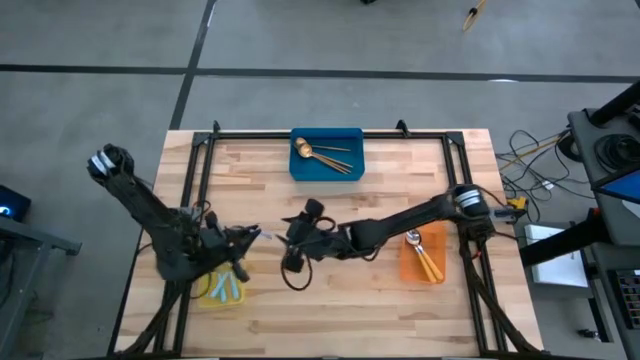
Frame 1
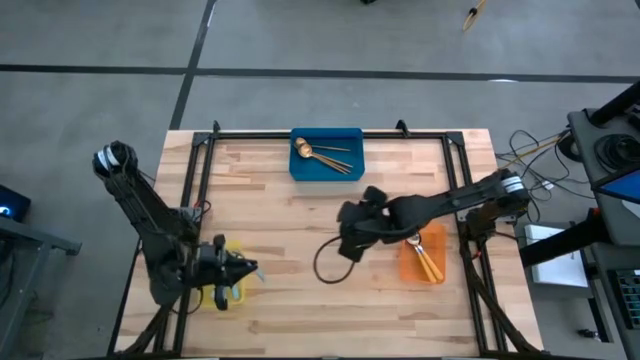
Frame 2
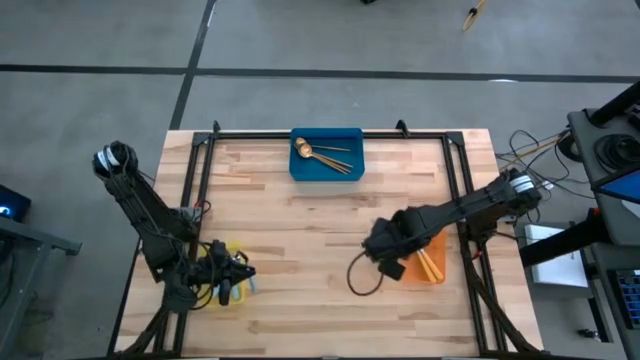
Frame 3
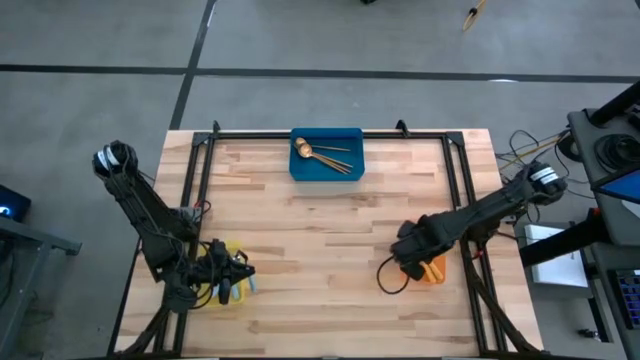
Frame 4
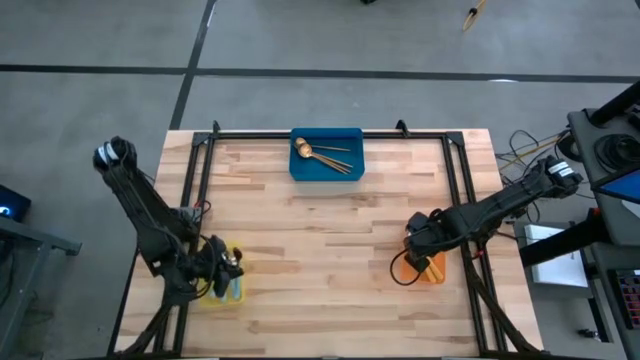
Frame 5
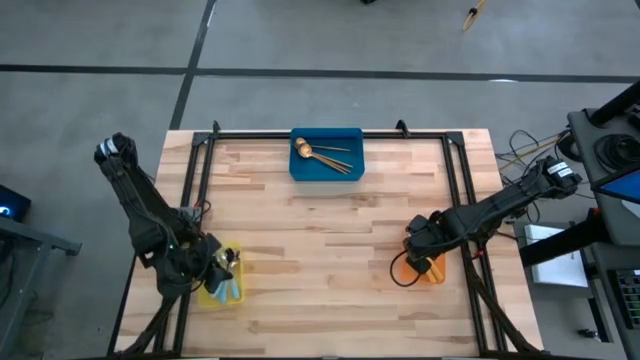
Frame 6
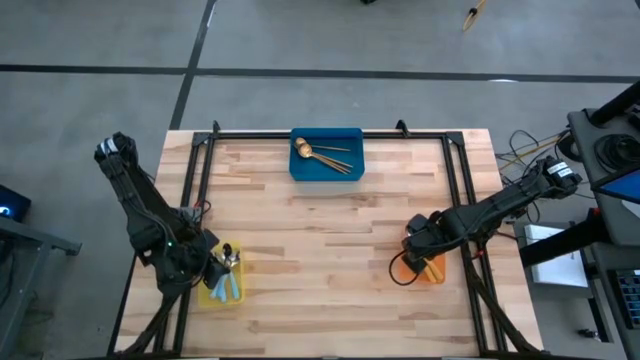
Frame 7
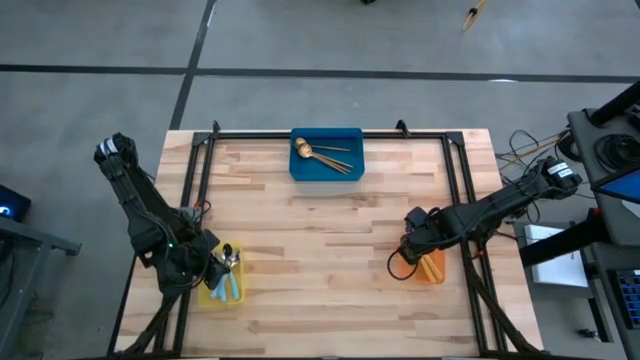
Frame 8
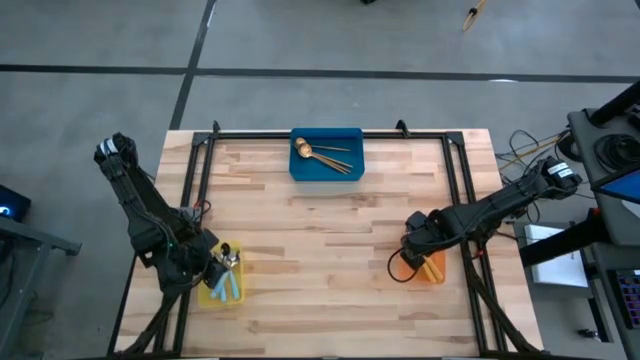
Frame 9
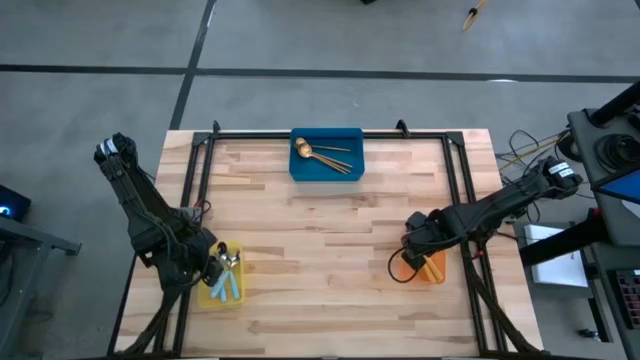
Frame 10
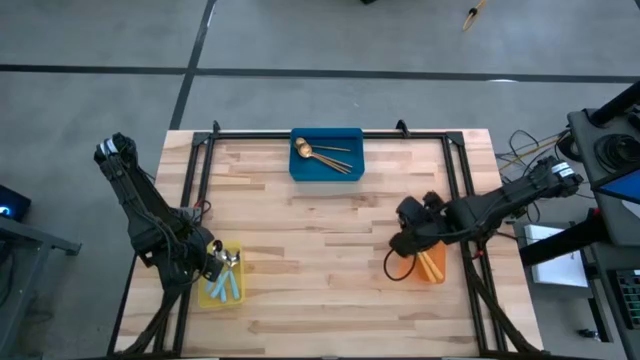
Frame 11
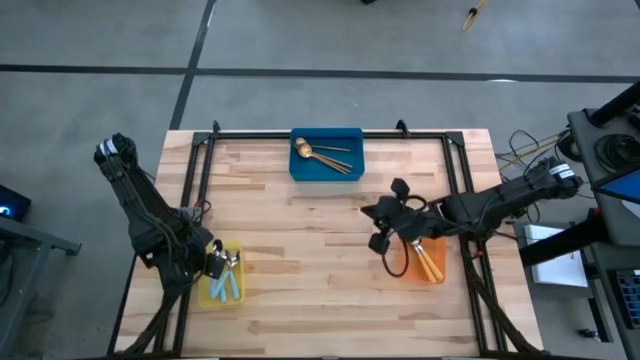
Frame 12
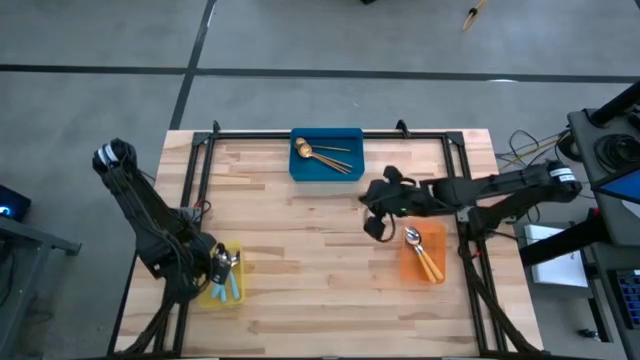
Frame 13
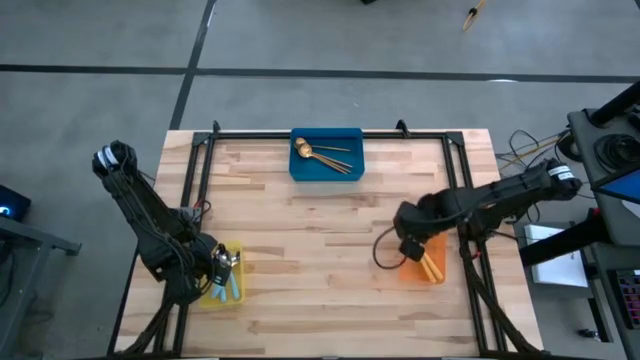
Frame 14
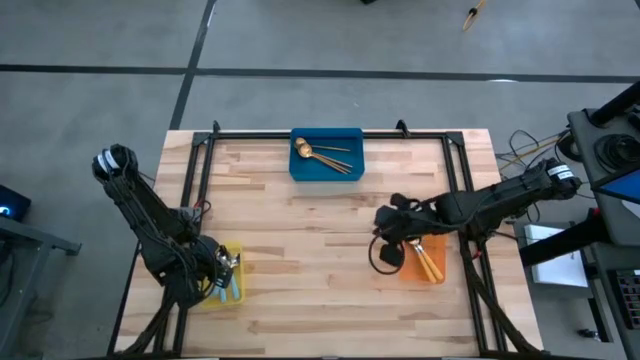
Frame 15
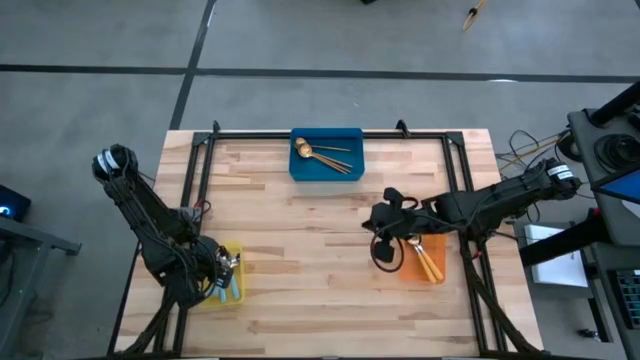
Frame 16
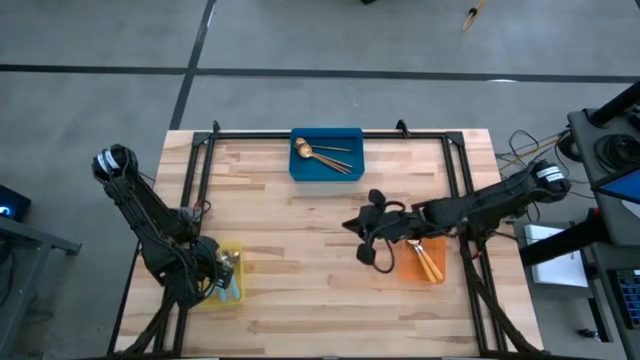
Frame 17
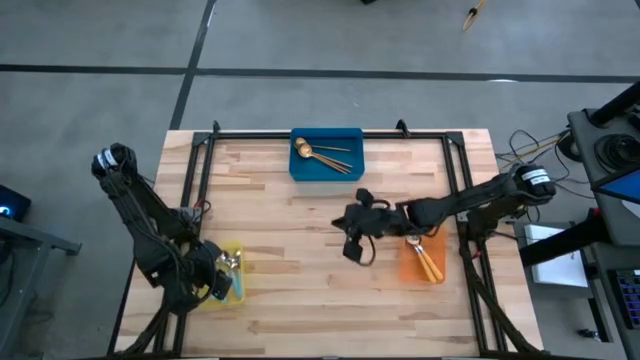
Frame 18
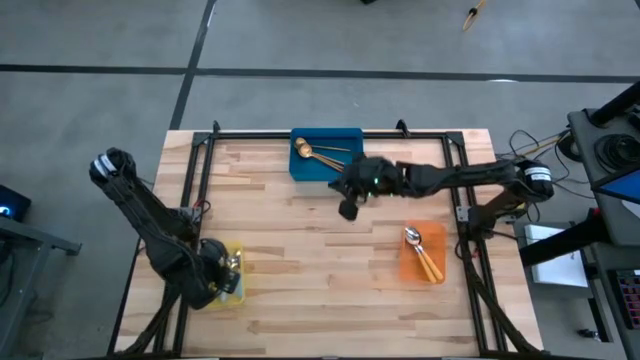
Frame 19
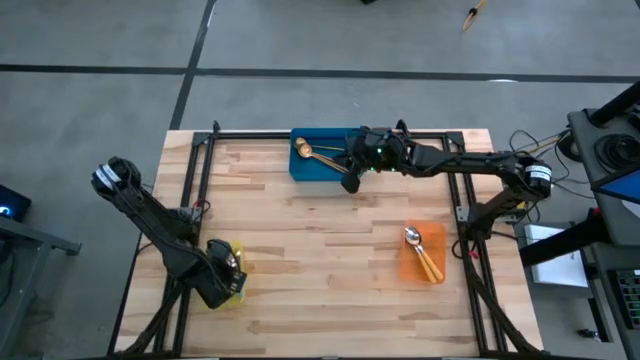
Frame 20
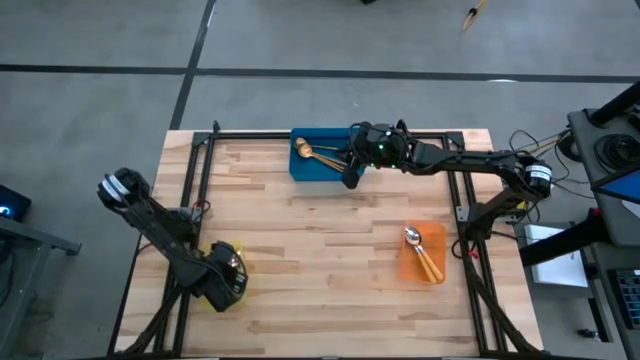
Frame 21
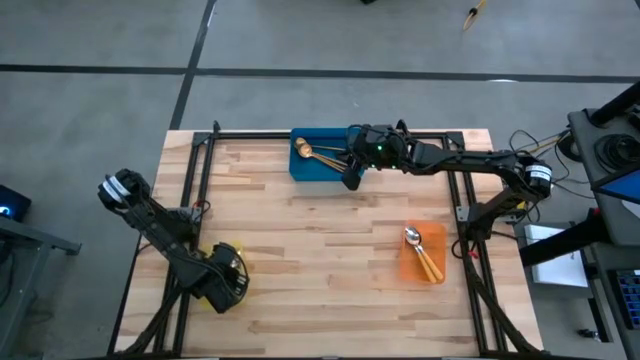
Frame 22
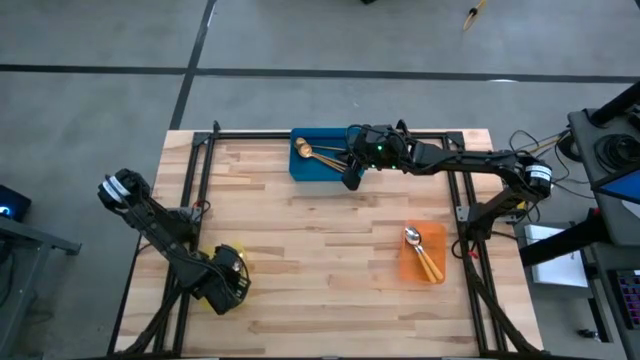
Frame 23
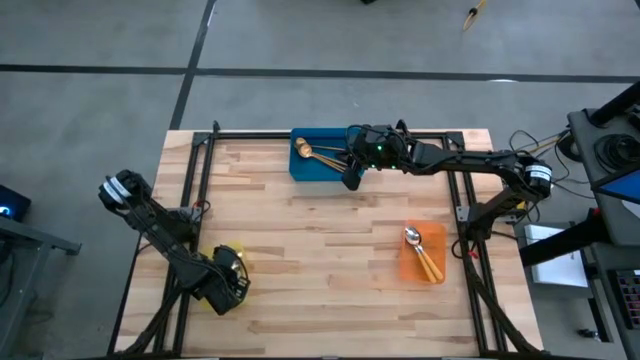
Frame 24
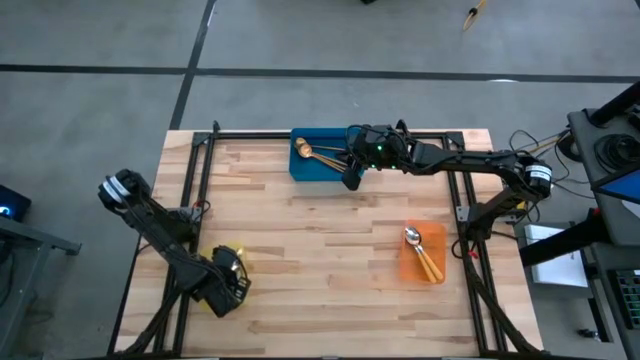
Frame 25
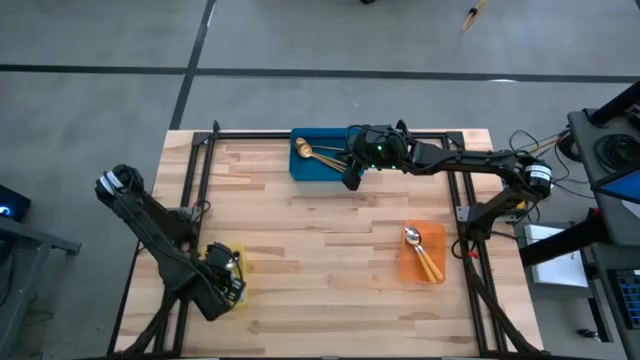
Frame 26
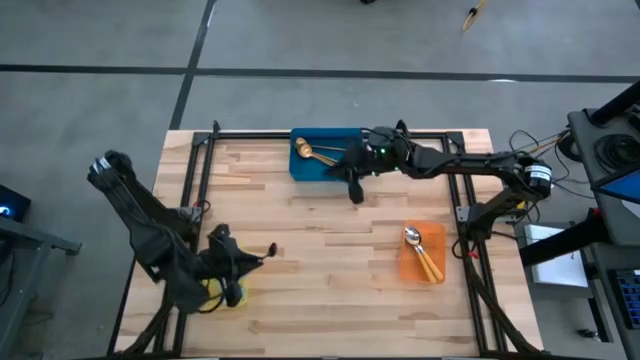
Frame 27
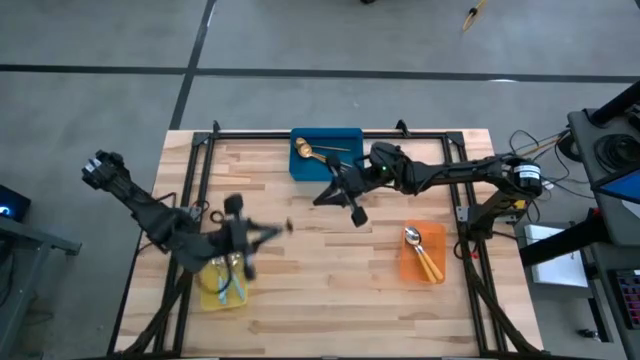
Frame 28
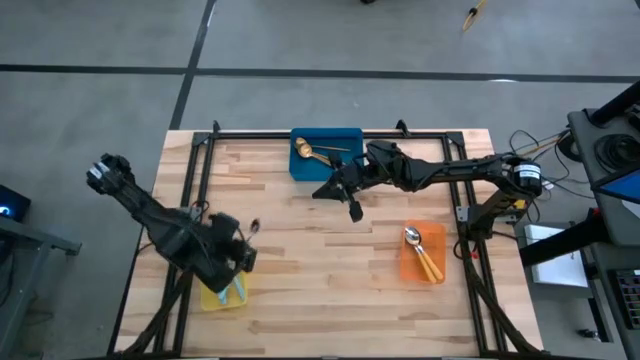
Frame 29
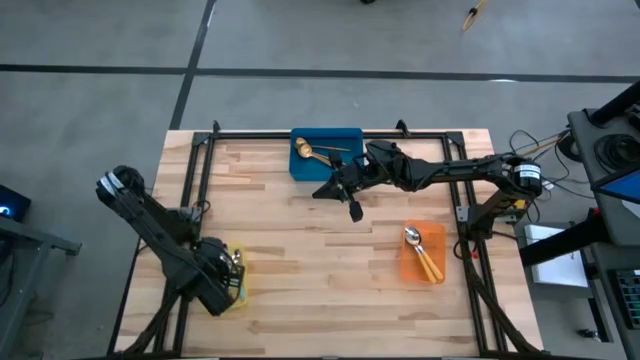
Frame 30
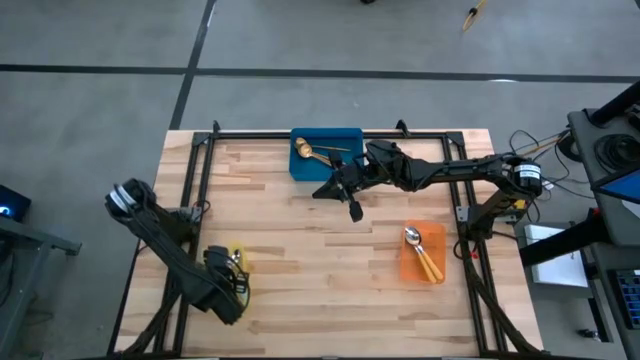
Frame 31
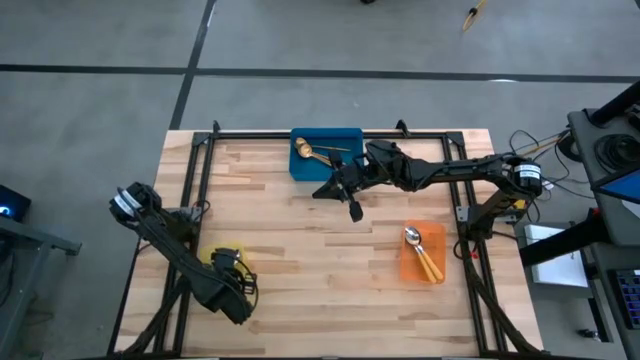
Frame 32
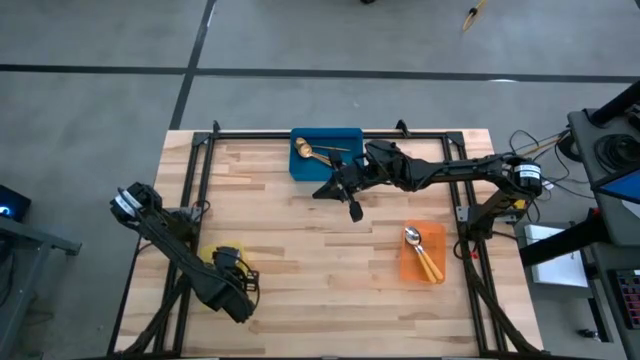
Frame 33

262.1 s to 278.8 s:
Task: Sort silverware by color (type)
Put the blue spoon into the yellow bin

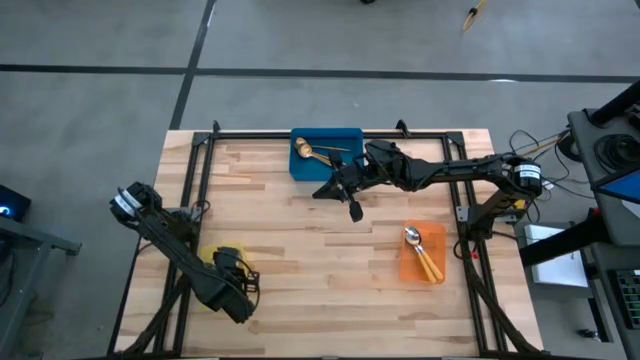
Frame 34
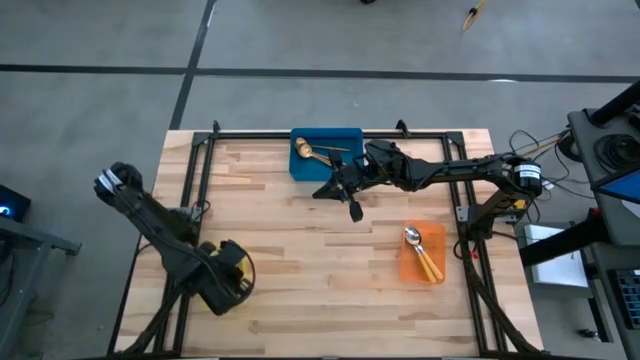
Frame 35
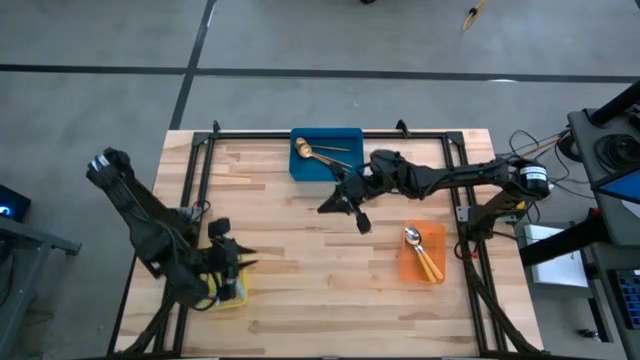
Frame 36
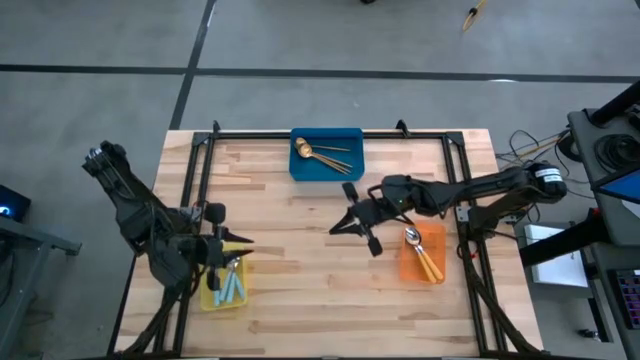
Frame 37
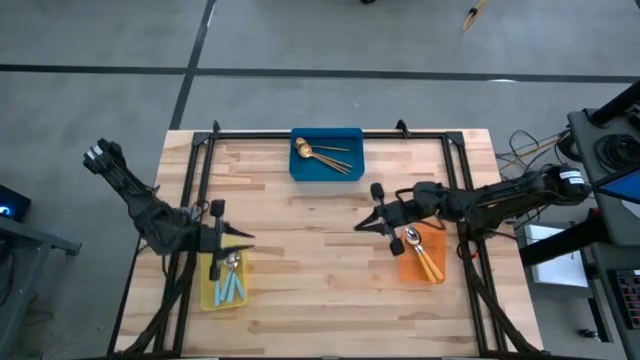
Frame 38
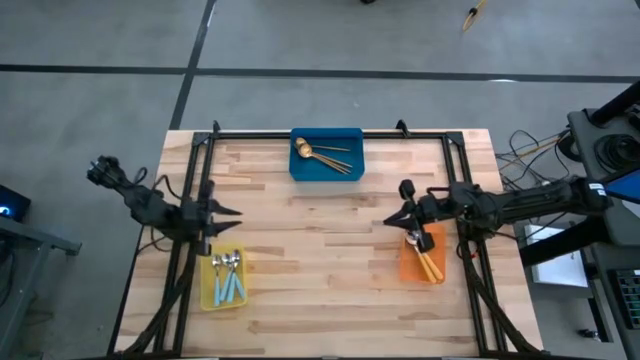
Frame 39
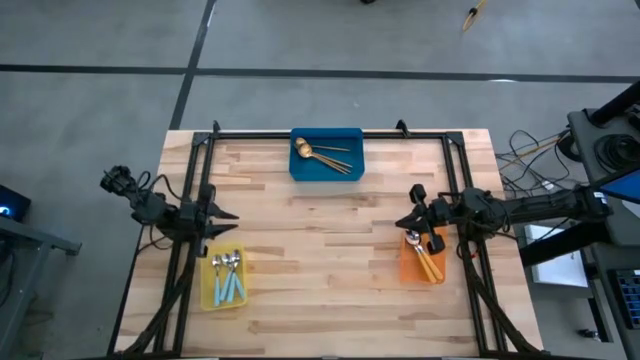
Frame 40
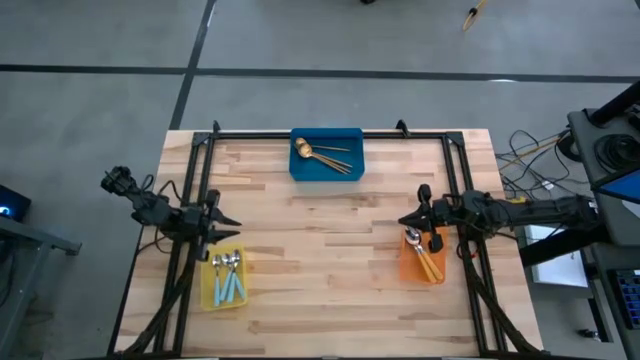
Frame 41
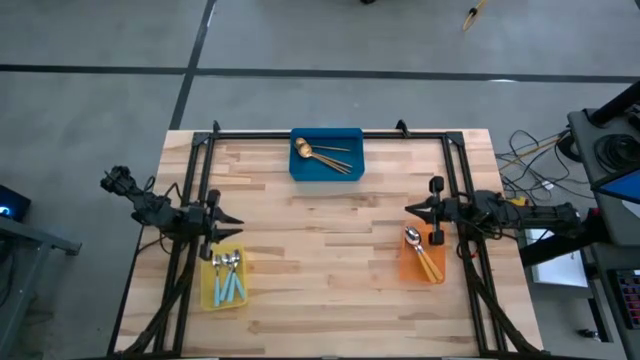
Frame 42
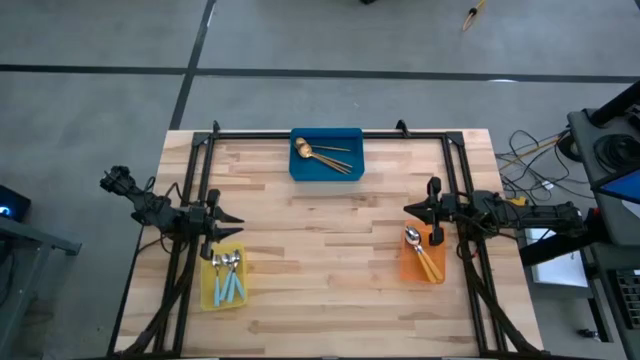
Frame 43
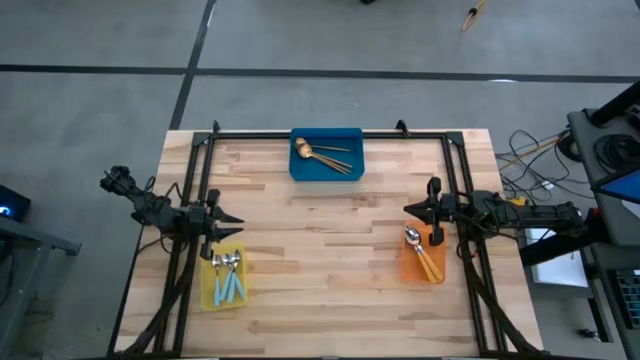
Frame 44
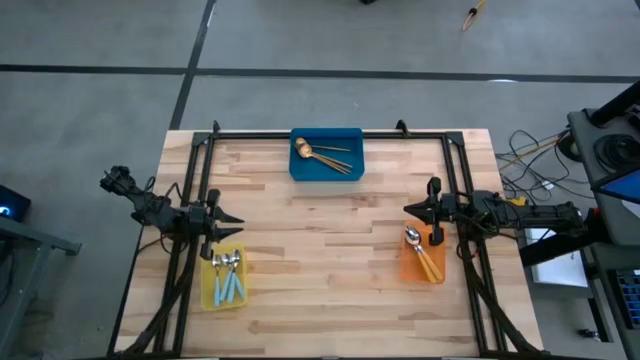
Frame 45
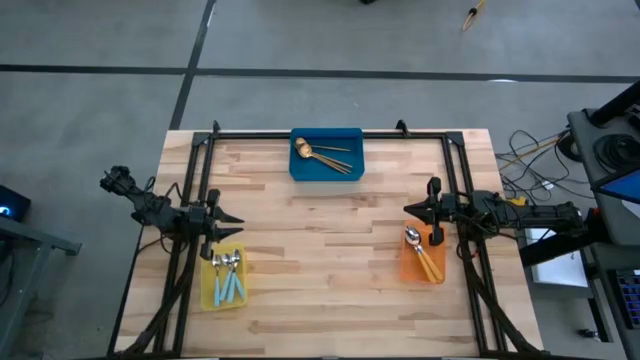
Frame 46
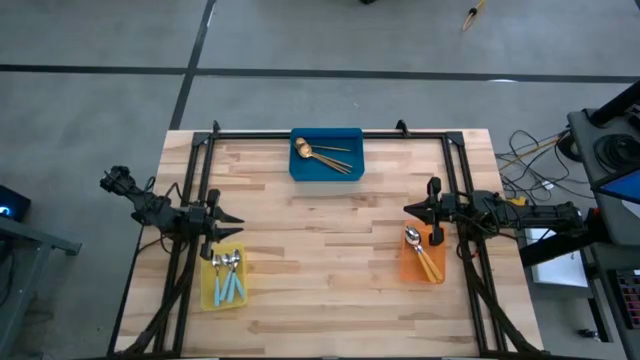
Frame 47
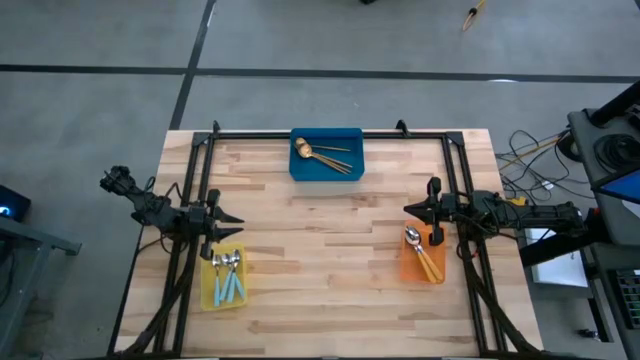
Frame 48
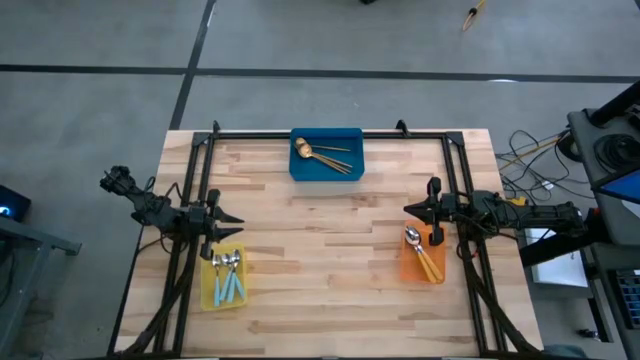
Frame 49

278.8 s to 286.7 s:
Return to Home Position
